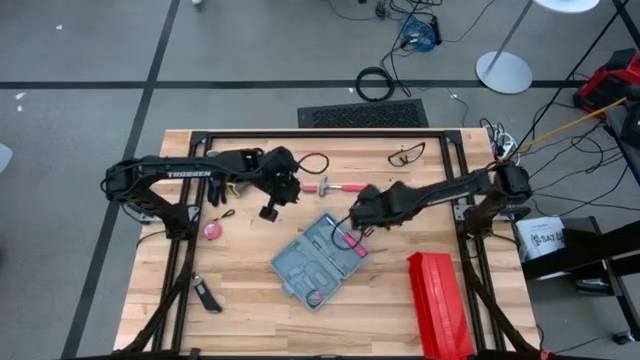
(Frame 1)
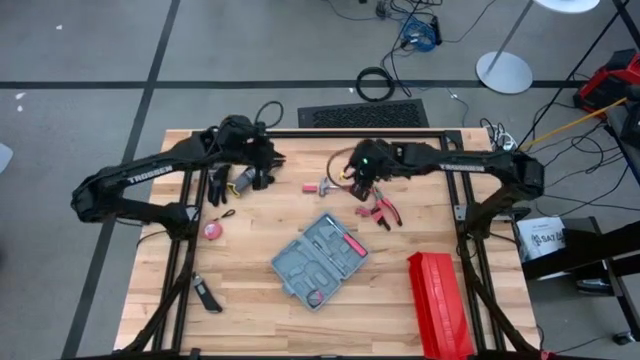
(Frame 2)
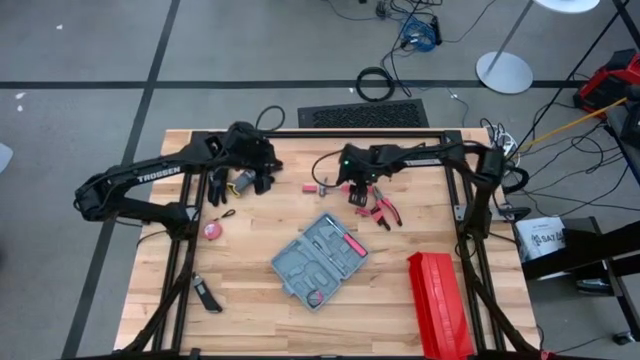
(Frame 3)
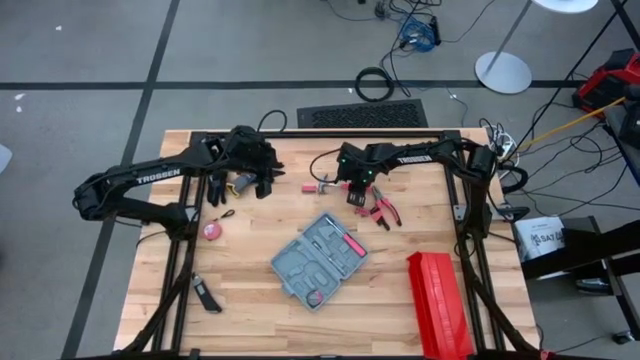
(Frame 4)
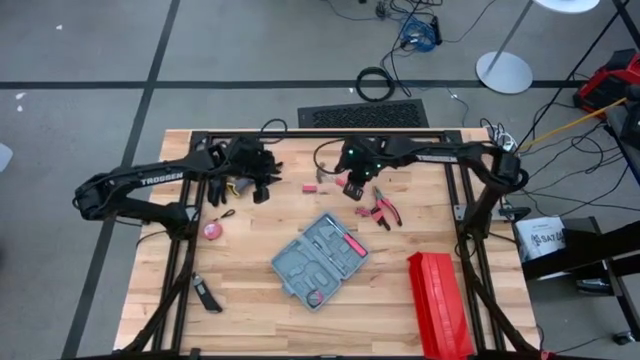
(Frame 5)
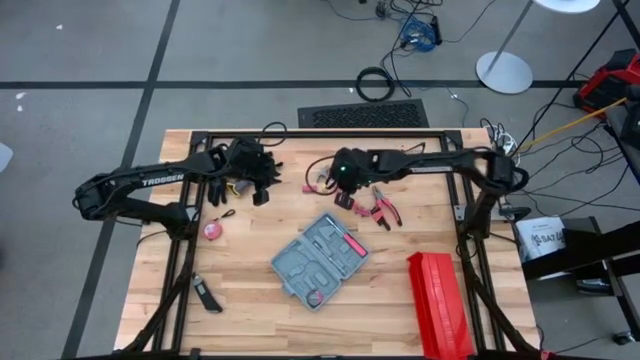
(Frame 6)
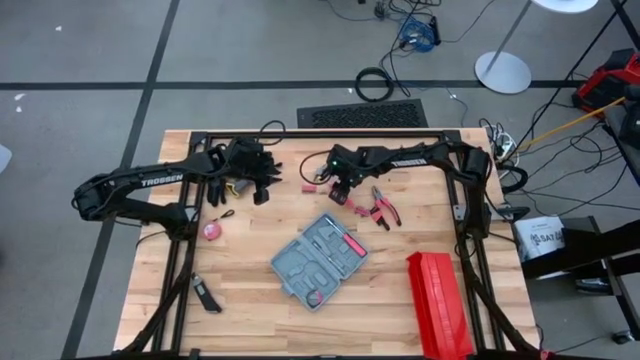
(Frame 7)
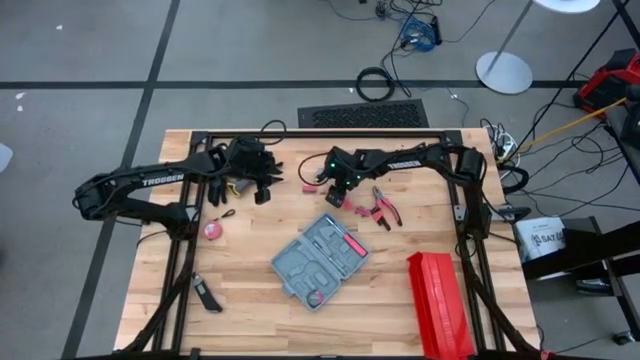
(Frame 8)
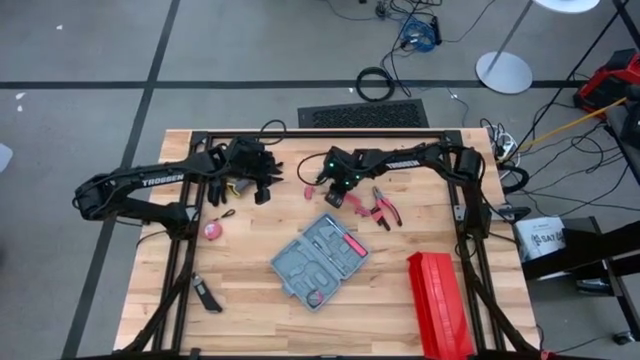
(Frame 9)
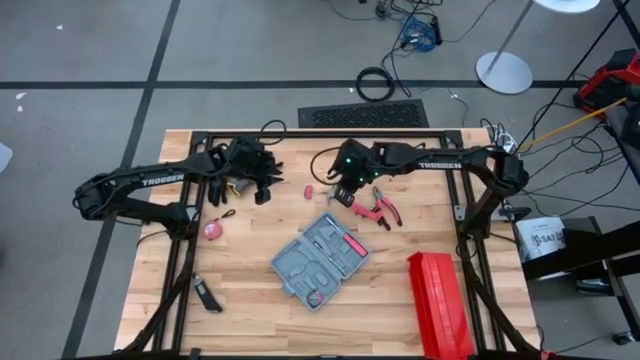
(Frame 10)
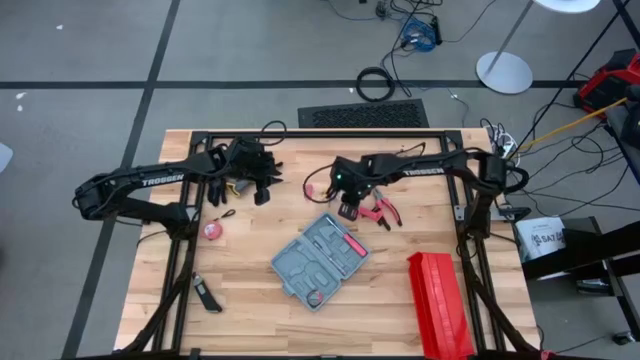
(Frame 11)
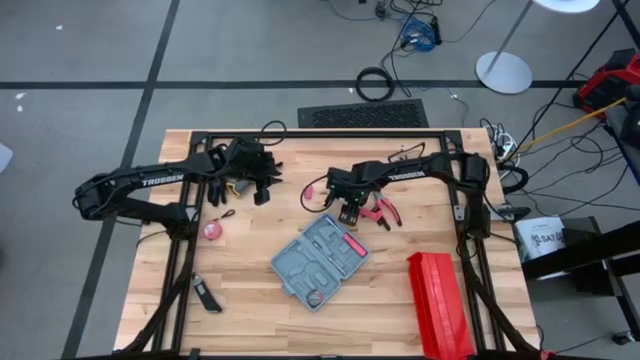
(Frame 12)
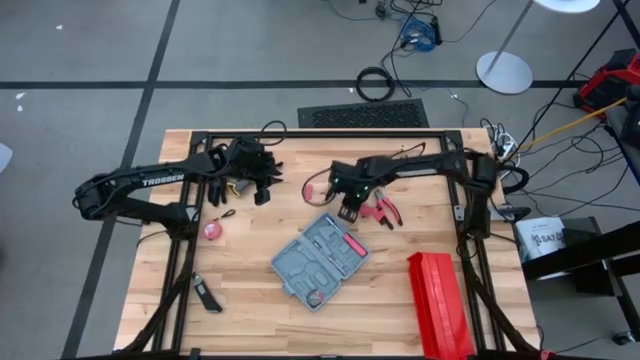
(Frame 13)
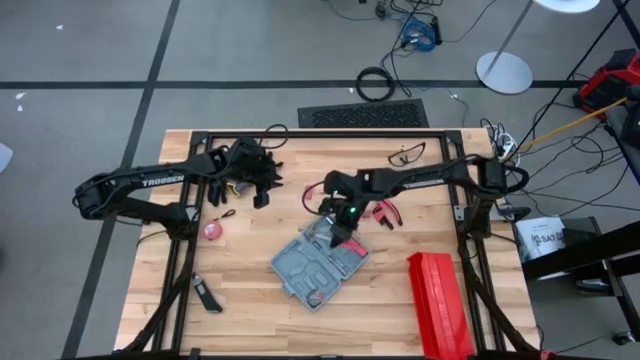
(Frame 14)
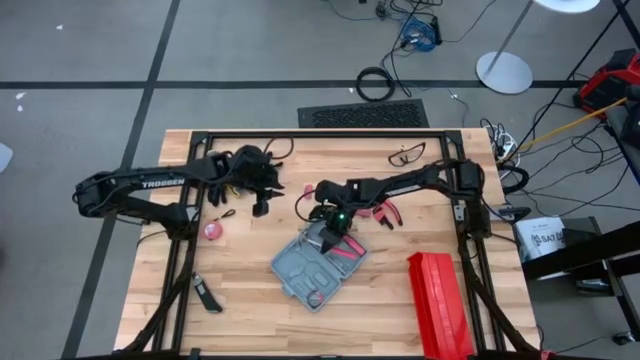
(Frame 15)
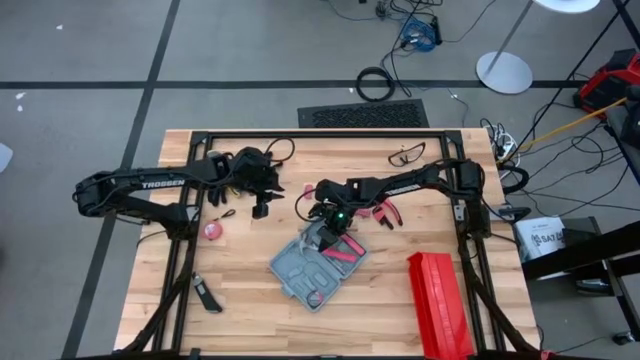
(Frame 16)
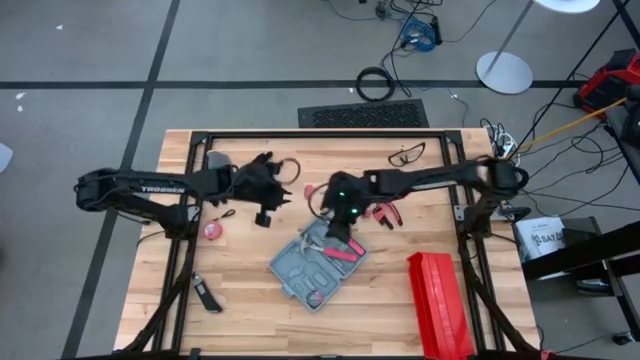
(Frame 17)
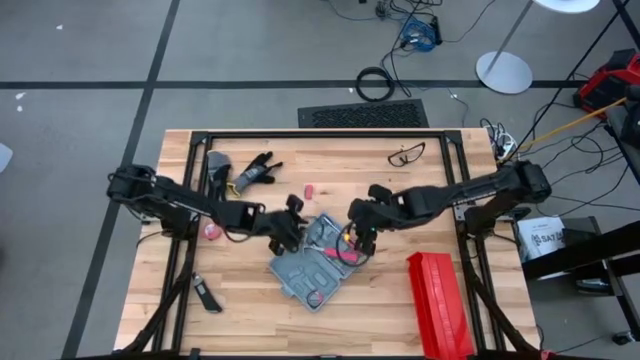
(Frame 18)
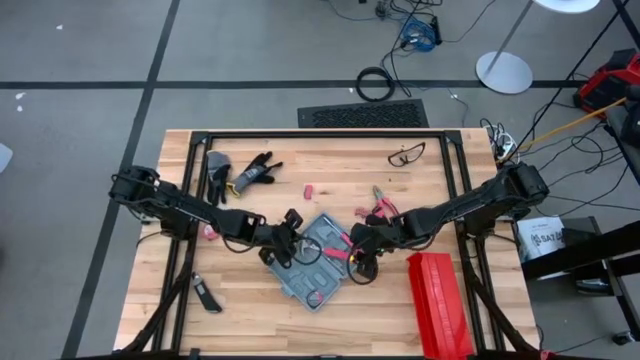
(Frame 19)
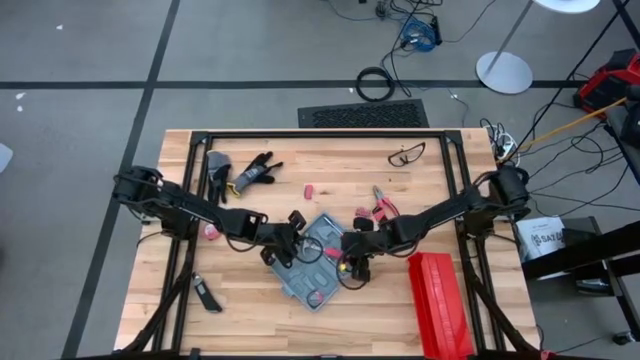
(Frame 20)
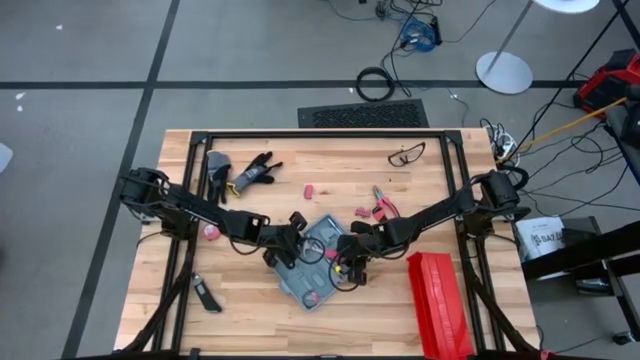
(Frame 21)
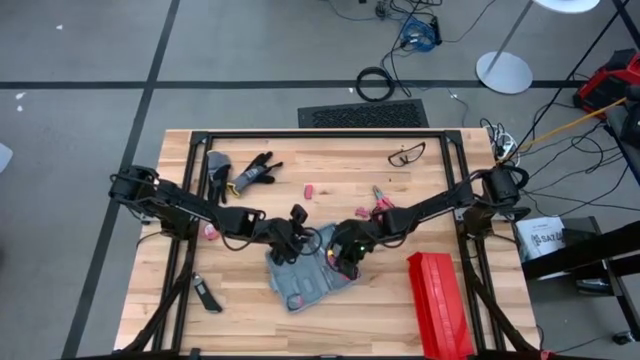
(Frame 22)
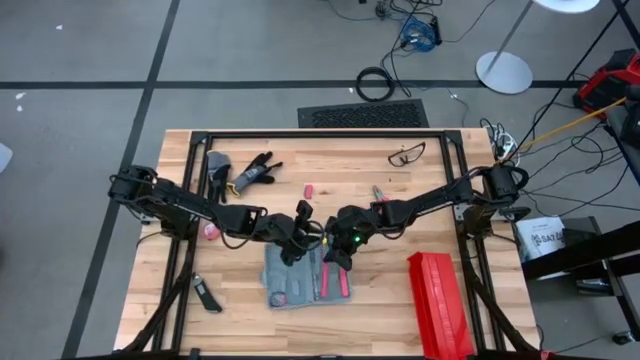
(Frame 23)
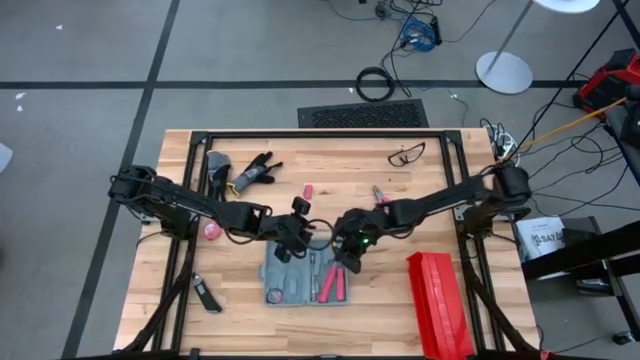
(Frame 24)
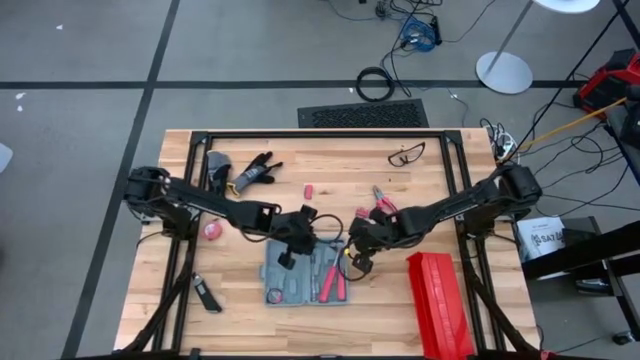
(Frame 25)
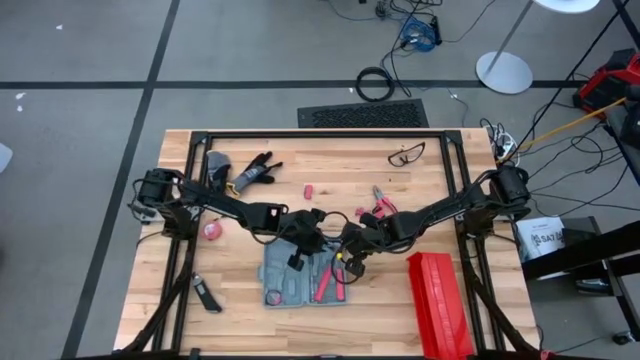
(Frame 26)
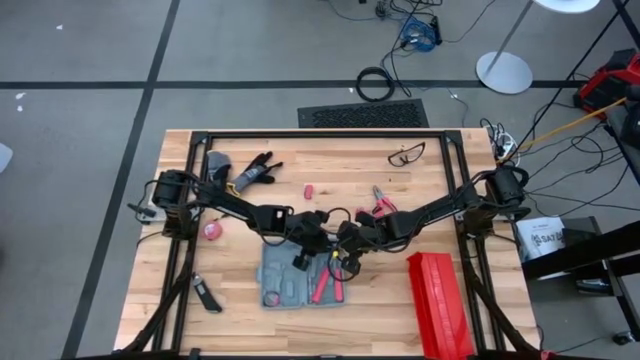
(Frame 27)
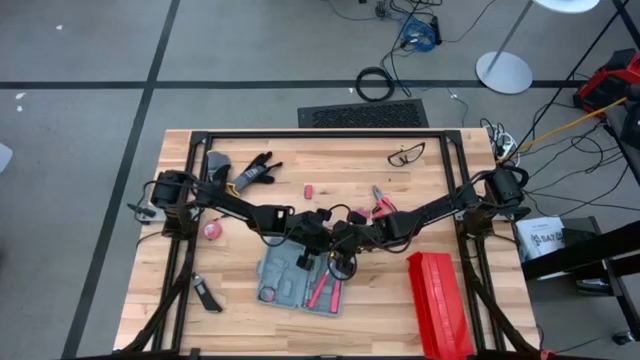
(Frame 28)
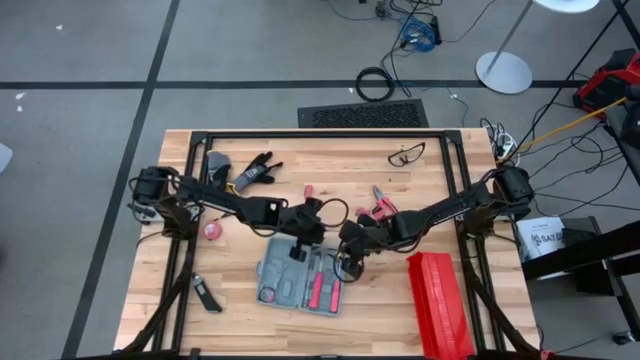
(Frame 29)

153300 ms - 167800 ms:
Task: prefit tool cases
Put the red hammer into the gray prefit tools case

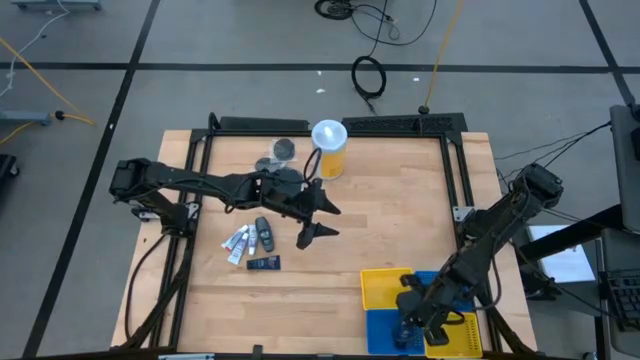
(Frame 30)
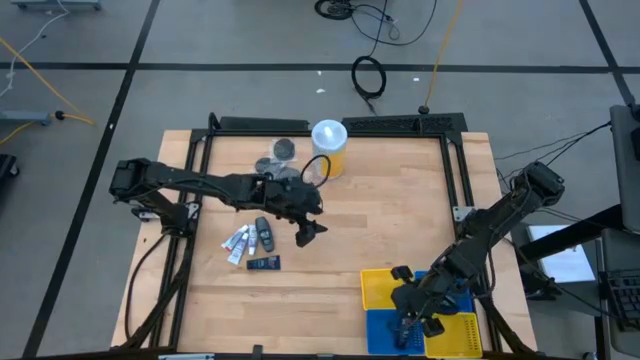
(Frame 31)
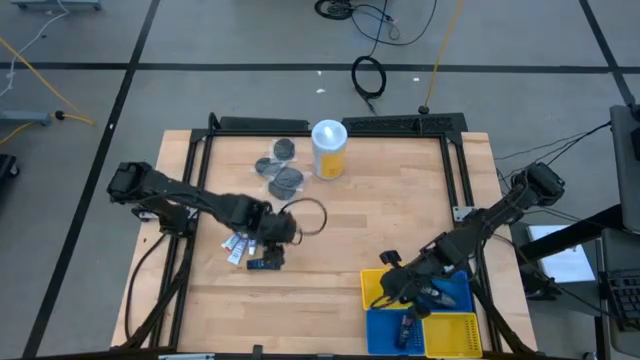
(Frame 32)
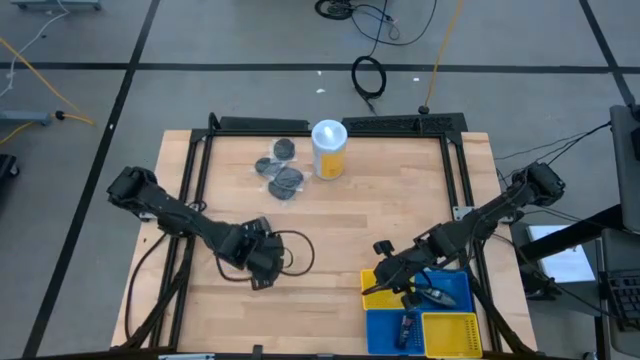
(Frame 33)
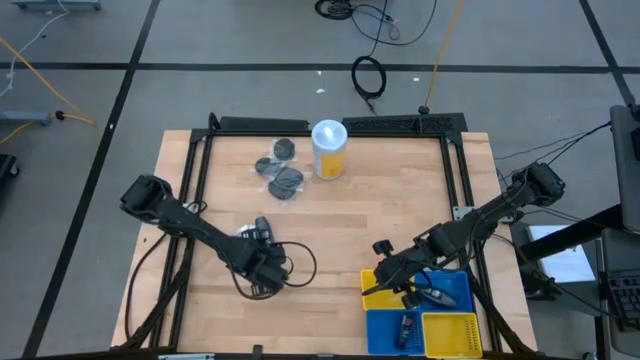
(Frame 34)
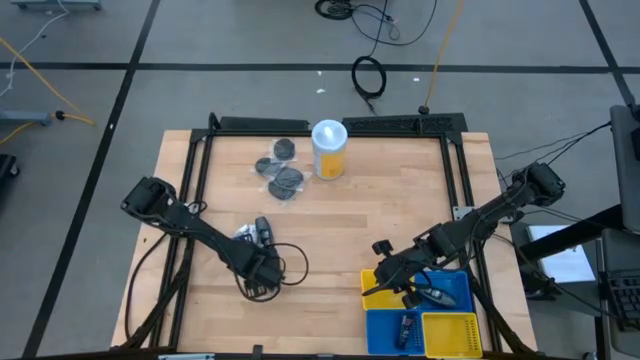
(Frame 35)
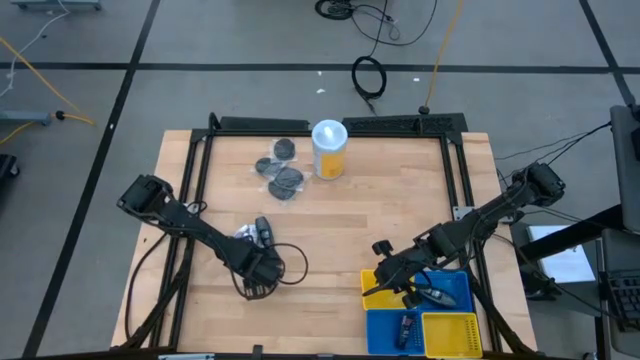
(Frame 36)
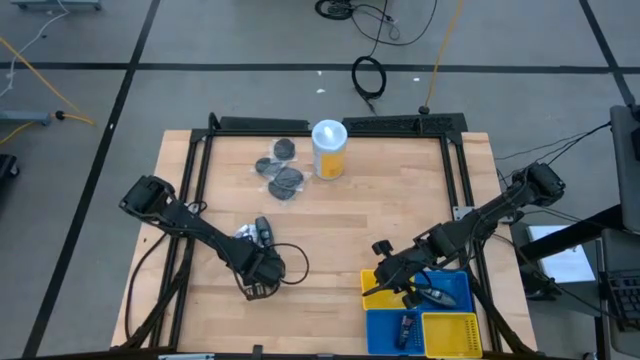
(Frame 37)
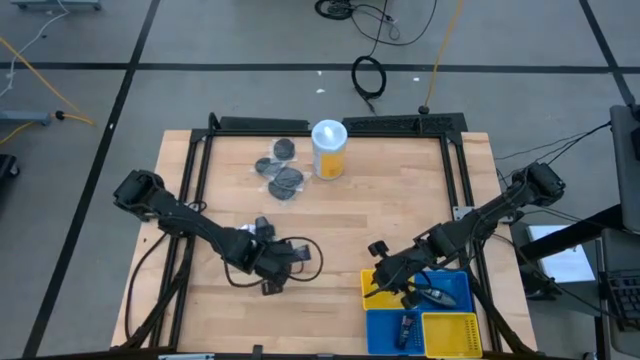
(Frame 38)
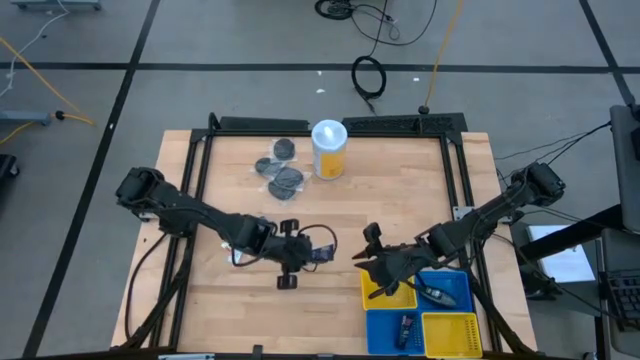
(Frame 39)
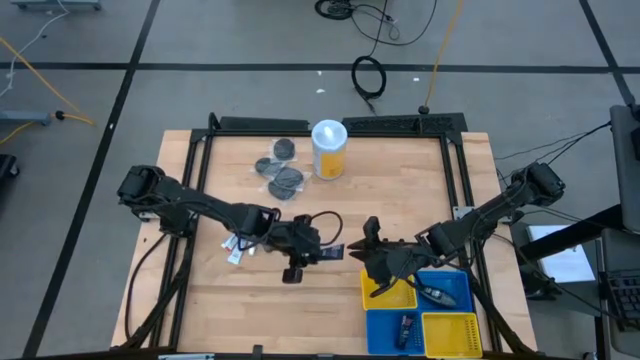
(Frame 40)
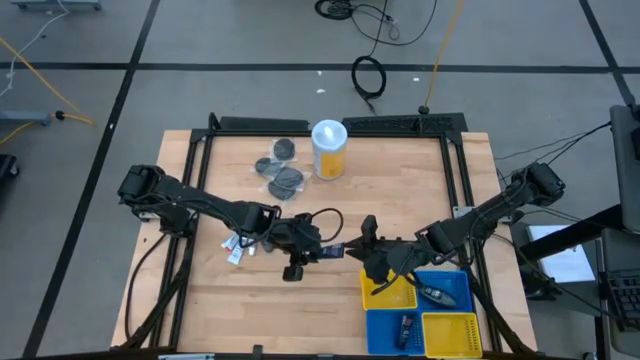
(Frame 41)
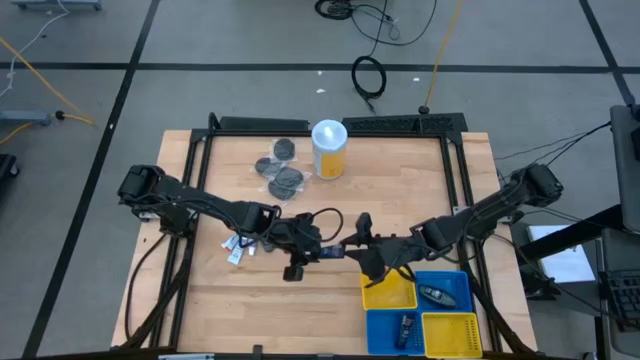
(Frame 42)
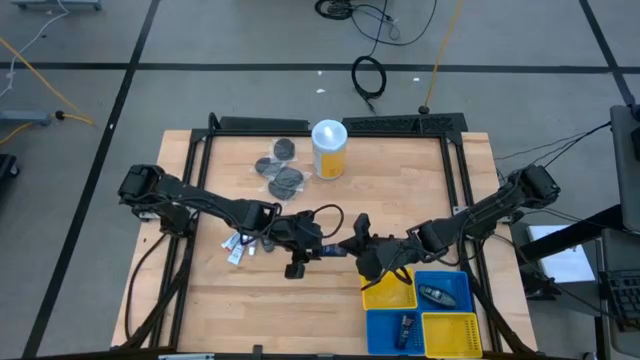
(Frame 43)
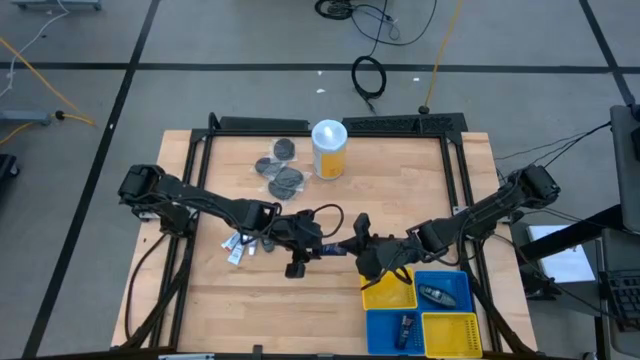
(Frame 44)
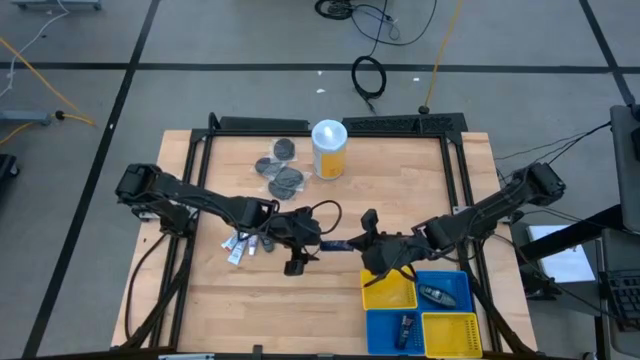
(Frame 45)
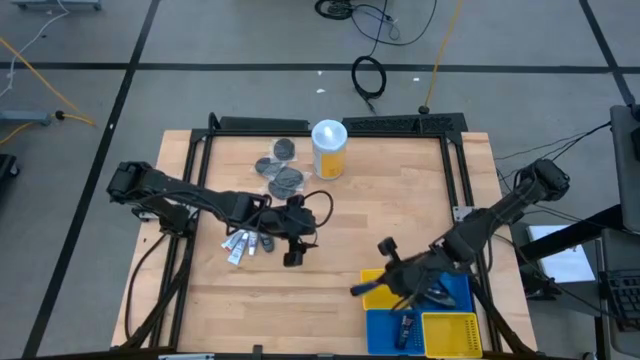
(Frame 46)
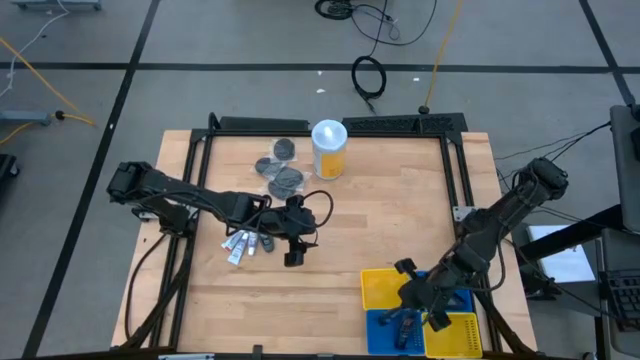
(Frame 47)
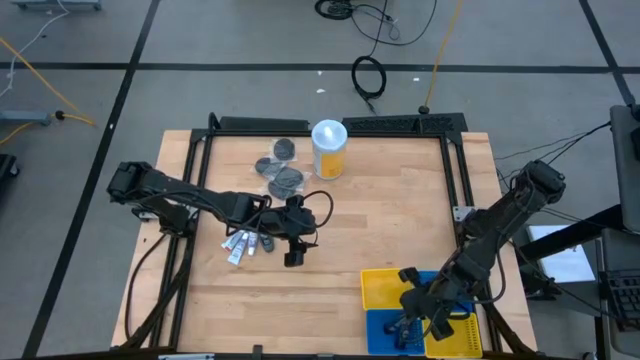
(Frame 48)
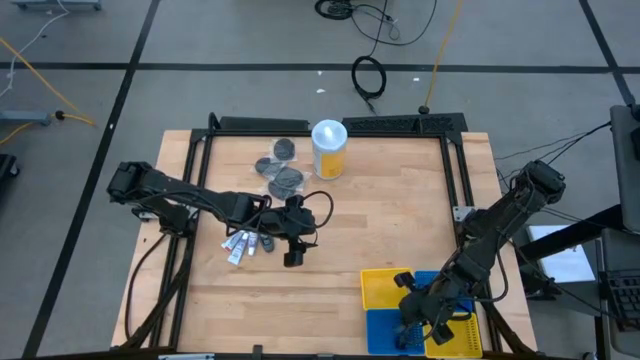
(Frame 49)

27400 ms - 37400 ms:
Task: Pick & Place Travel size toiletries
Put the shave cream into the bottom blue basket
